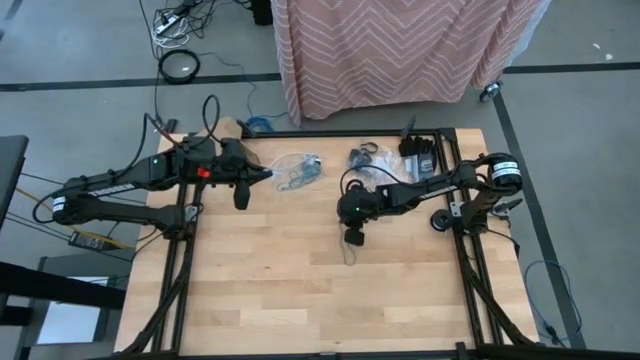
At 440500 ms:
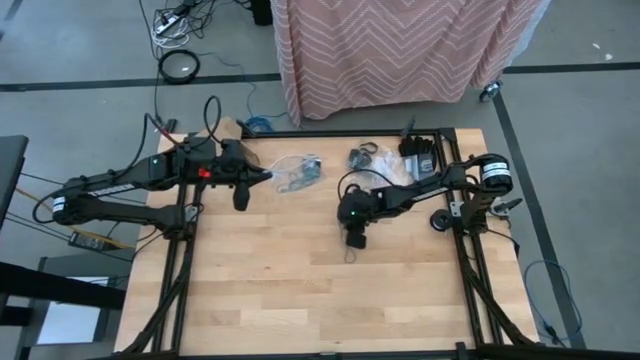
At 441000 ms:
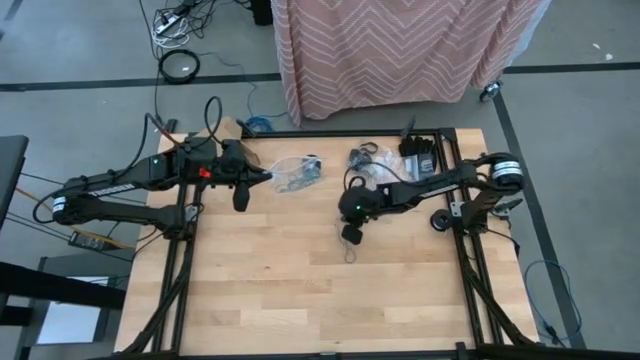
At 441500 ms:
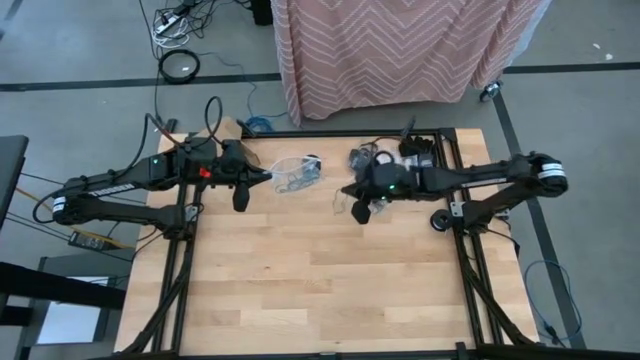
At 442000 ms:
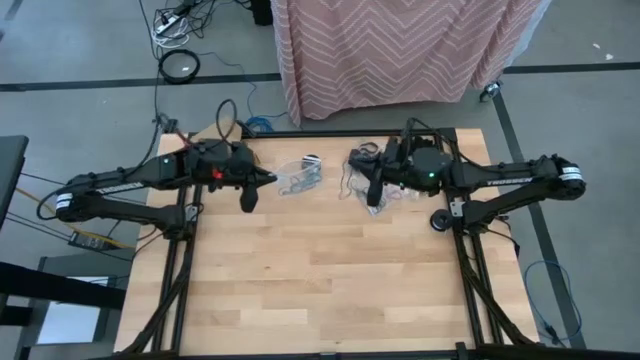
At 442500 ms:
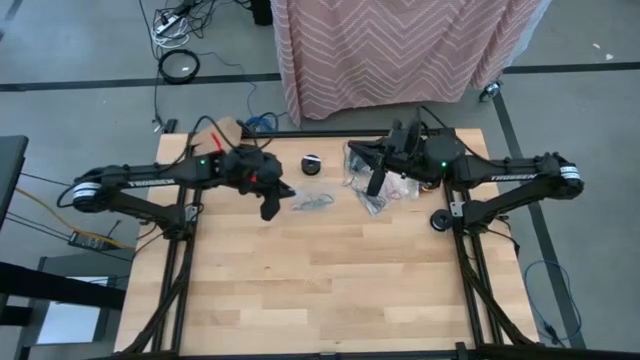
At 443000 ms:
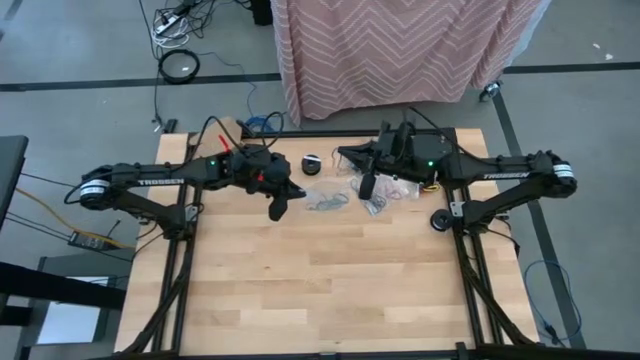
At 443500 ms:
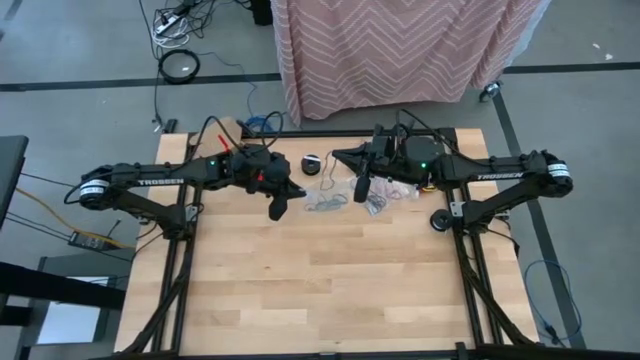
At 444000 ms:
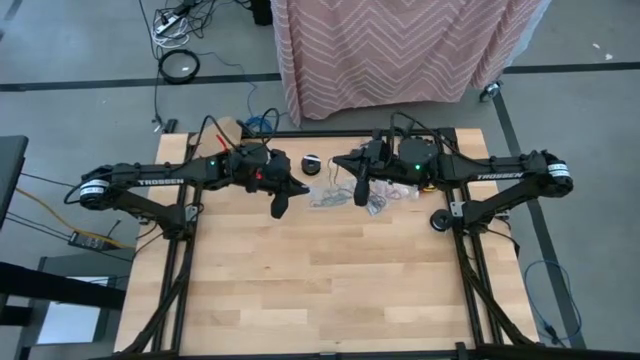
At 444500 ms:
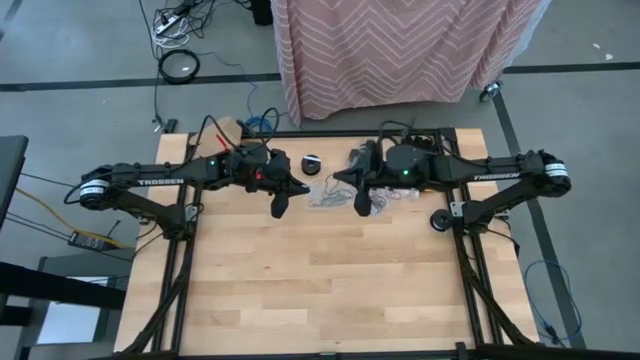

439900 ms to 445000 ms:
Task: Sort rubber bands
Put the blue rubber band into the transparent zip bag

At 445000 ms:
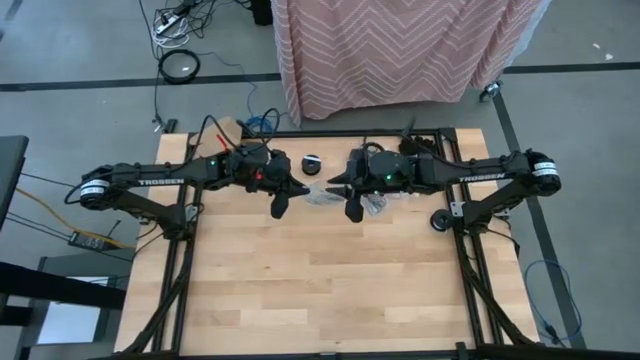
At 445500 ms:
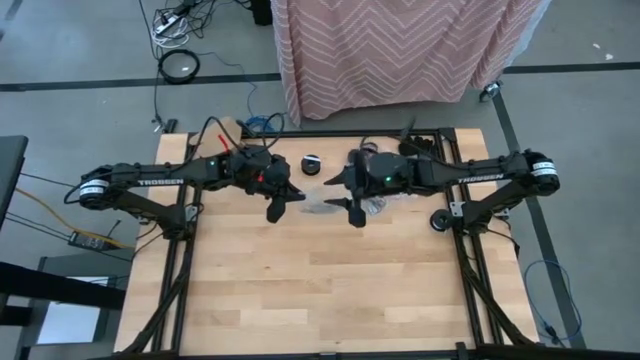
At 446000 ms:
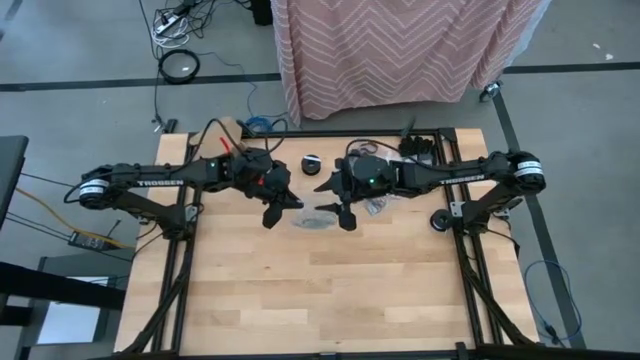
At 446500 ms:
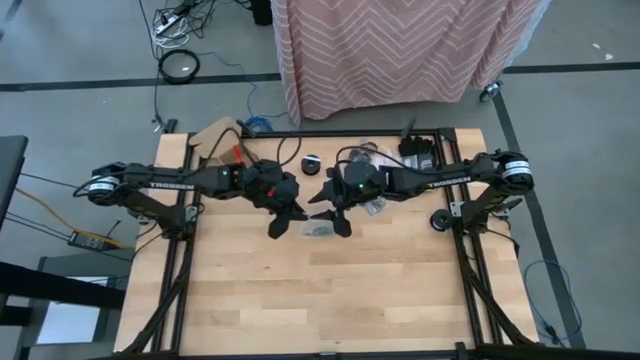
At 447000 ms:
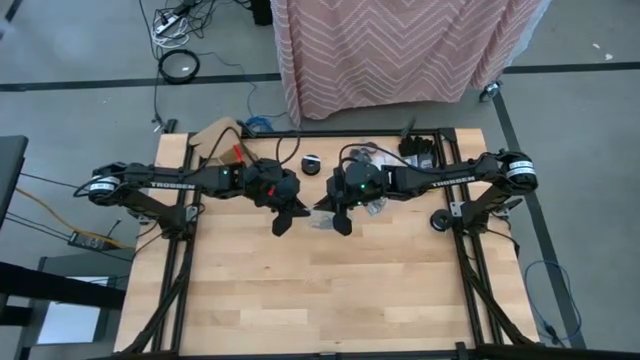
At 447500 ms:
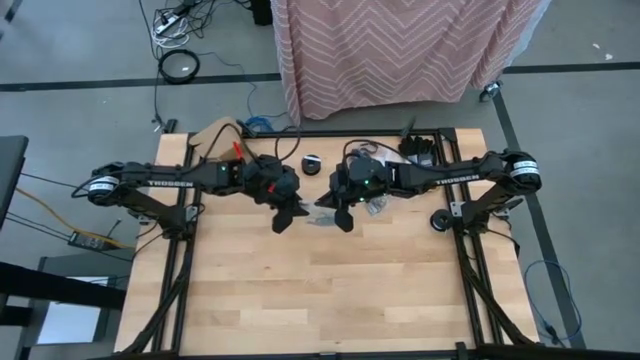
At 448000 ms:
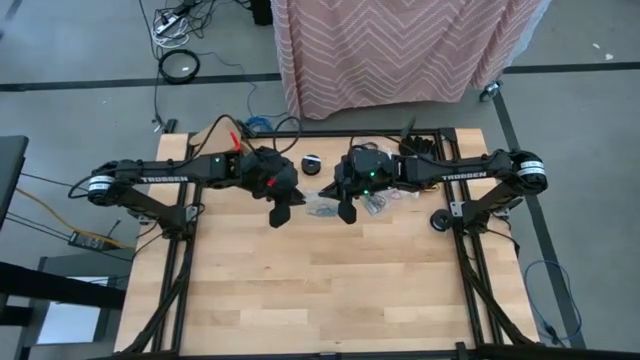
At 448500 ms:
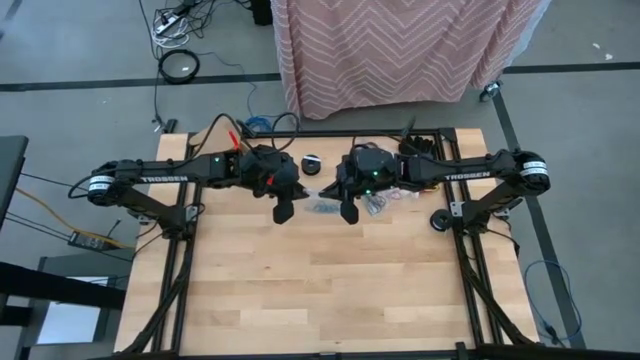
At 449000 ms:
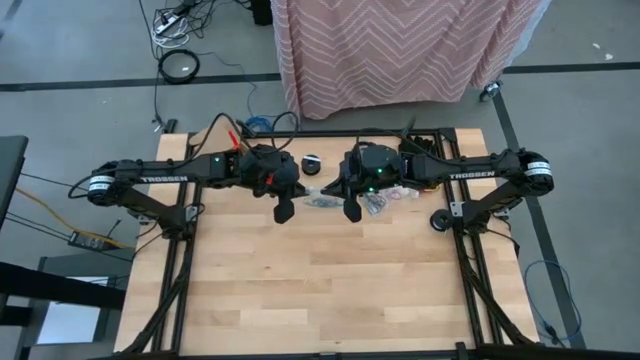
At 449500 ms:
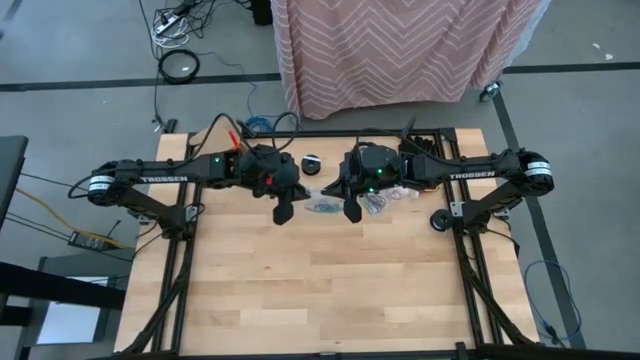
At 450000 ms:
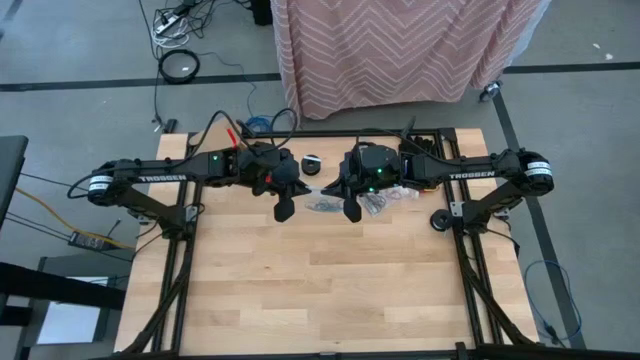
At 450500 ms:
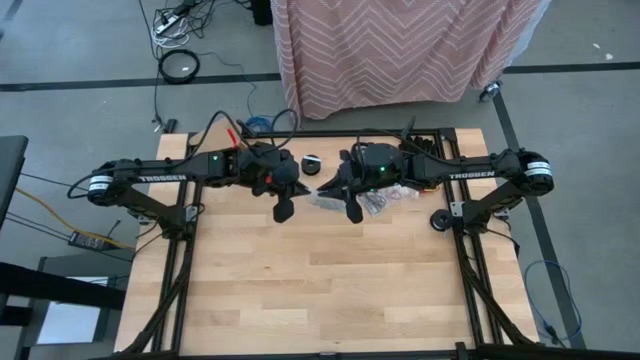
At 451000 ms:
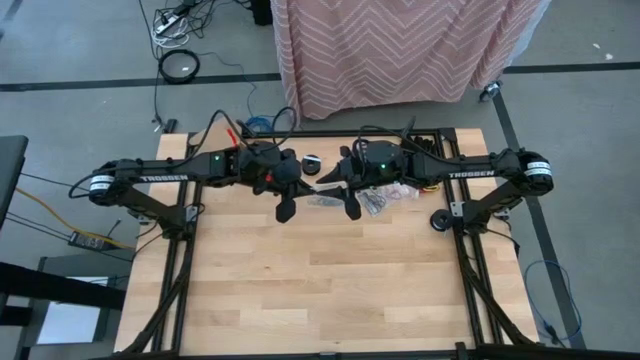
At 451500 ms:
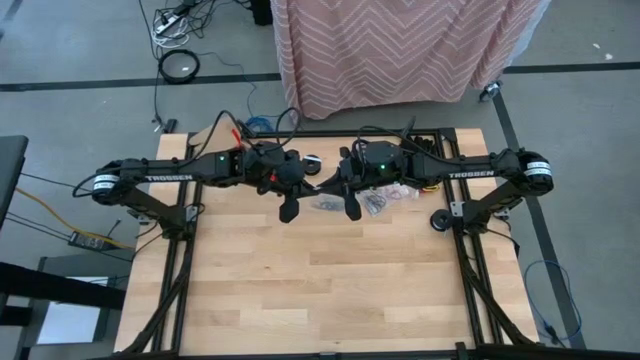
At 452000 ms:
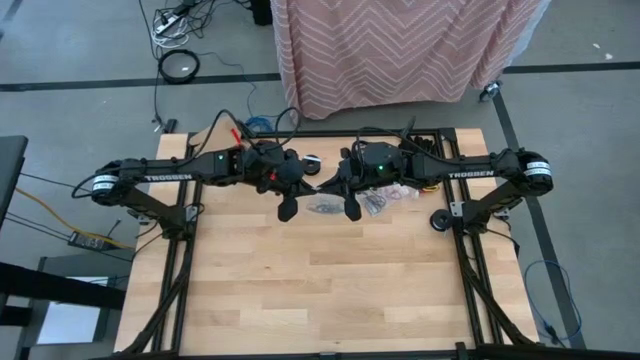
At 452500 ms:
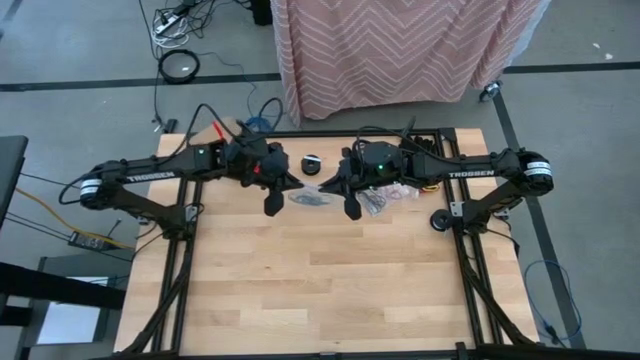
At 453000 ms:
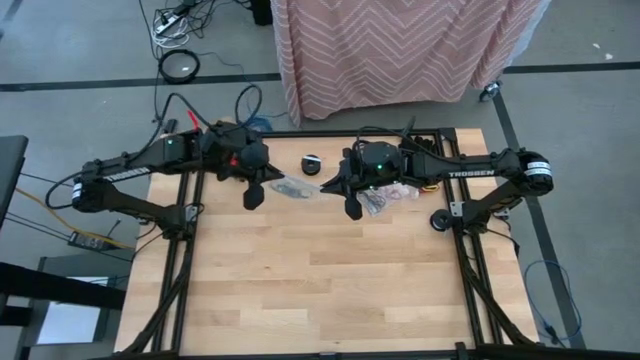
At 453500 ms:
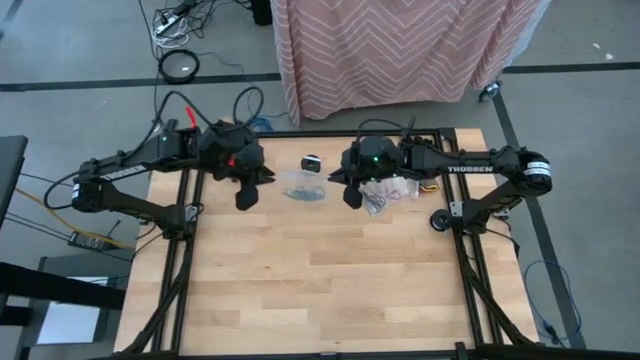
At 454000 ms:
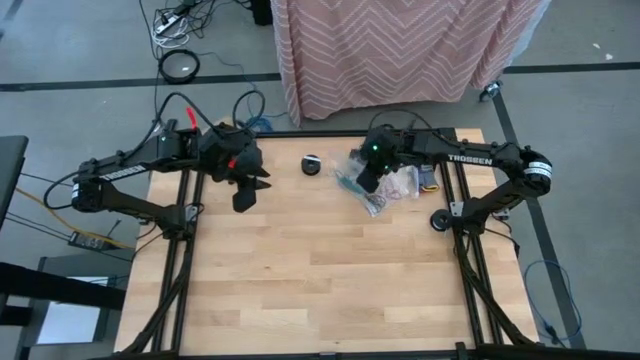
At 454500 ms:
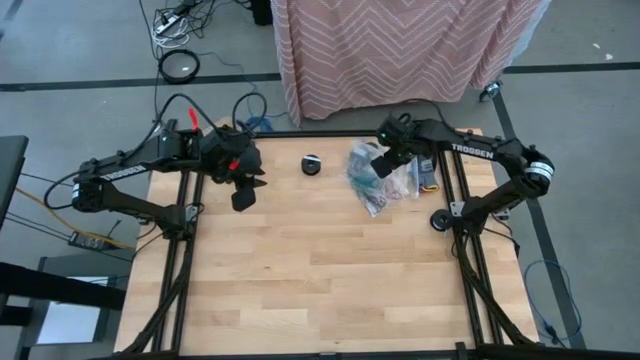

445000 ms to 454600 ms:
Close the transparent zip bag

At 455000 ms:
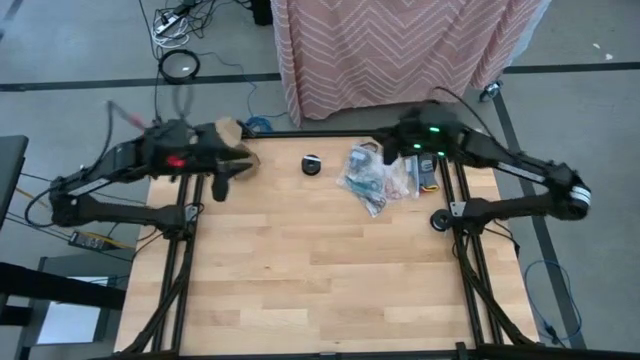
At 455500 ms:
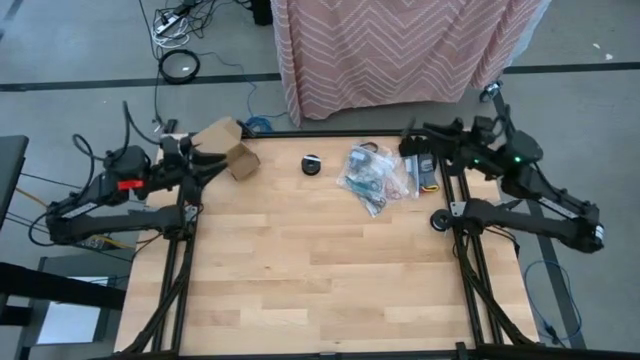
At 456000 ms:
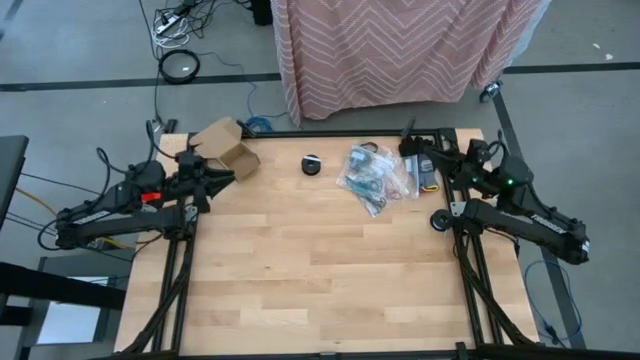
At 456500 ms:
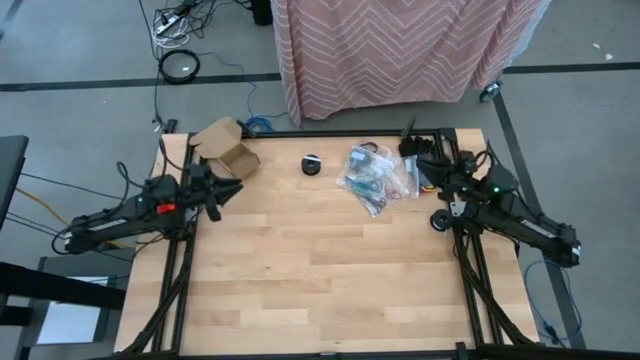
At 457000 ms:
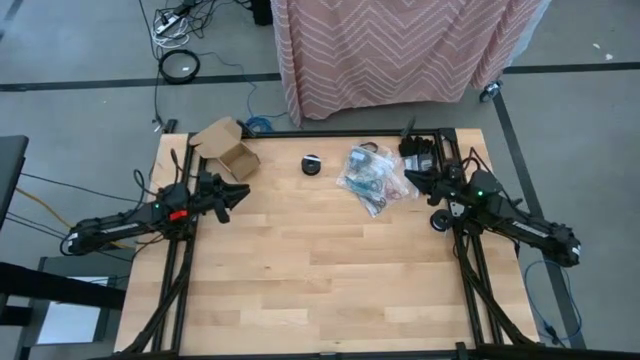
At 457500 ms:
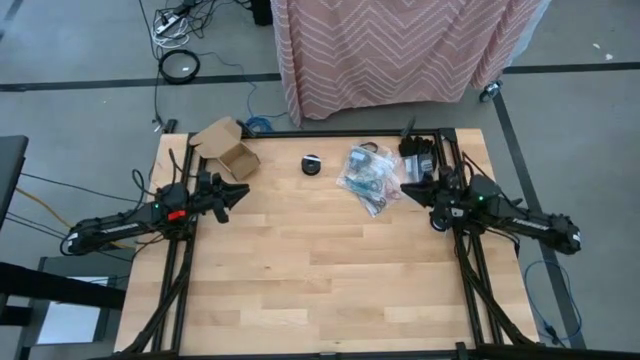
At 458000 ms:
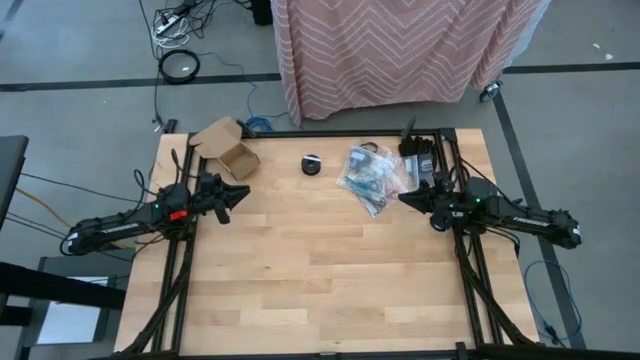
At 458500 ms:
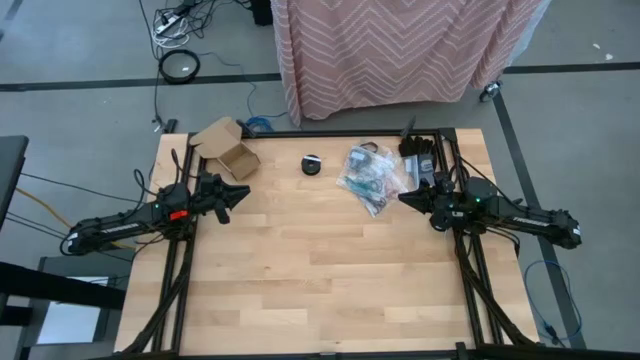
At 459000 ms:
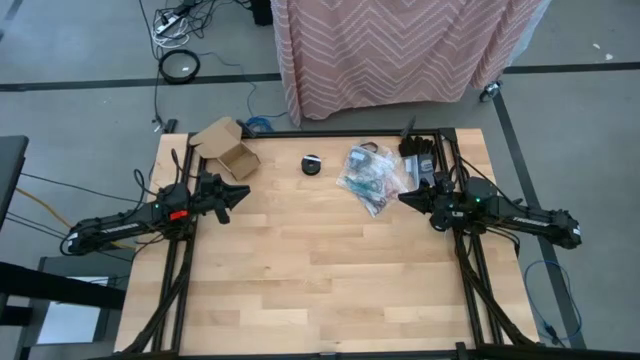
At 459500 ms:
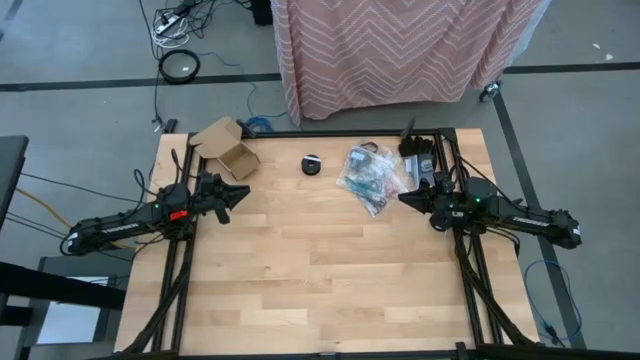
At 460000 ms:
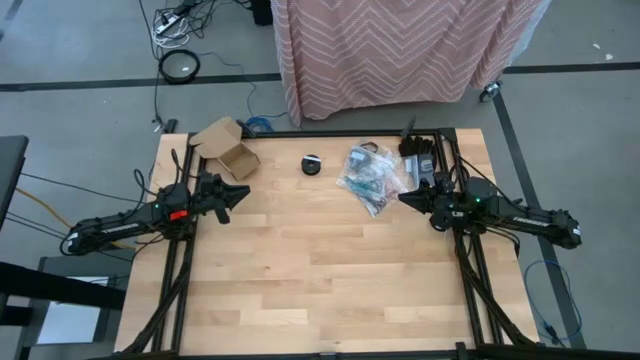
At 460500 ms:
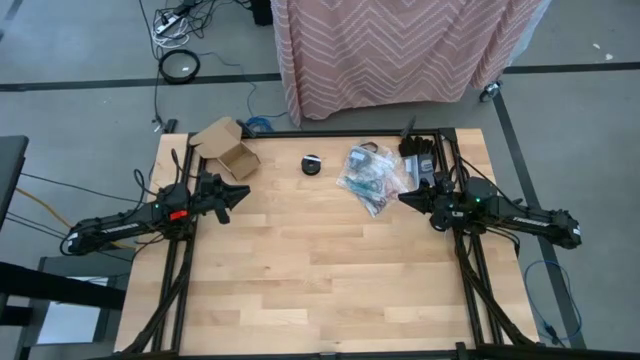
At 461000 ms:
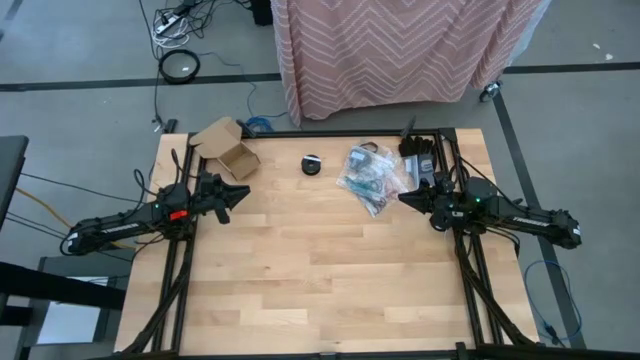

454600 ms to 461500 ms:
Return to Home Position

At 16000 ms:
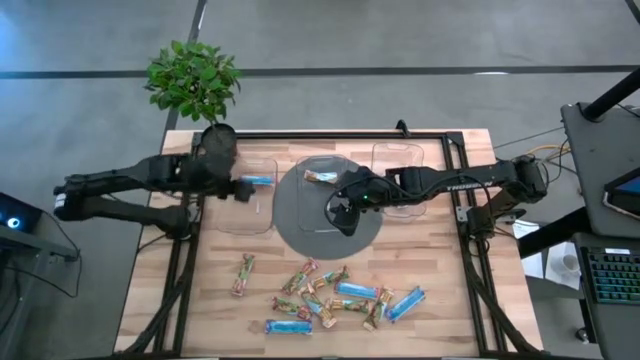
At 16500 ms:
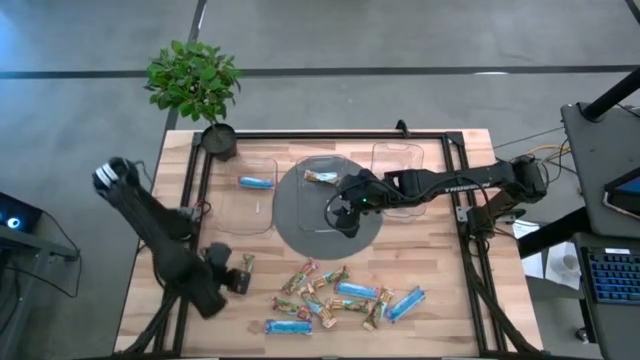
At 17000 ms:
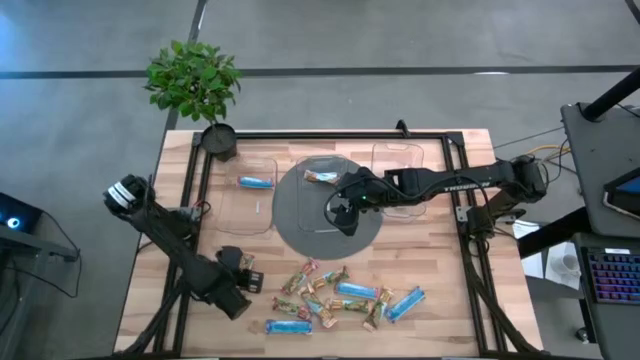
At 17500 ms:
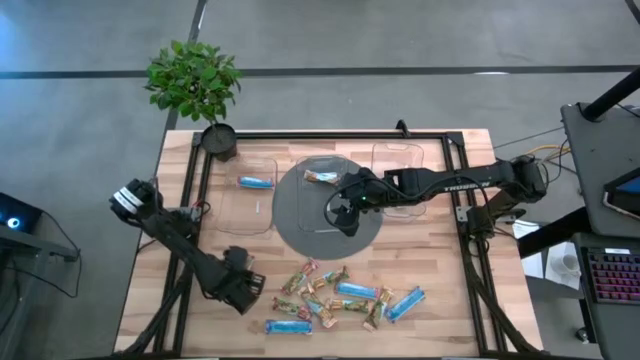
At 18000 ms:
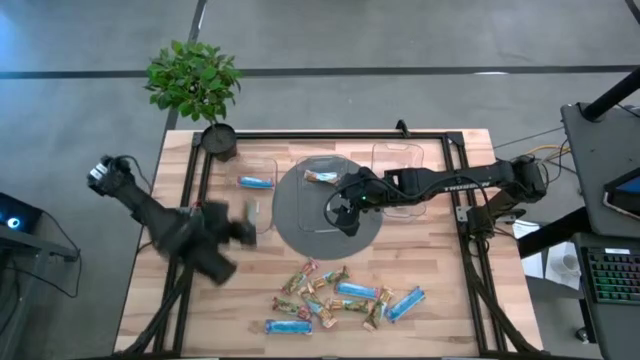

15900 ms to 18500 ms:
Task: Pick and place Granola Bars by type
Put the red granola bar into the left transparent bin
